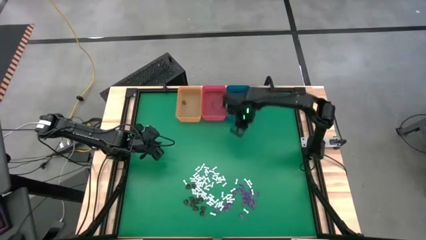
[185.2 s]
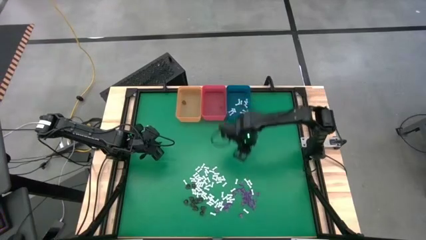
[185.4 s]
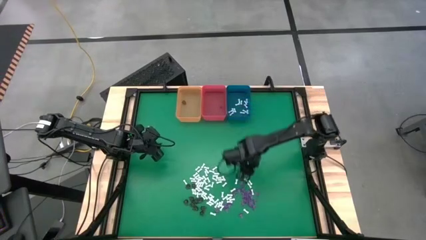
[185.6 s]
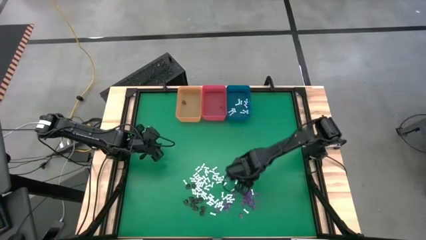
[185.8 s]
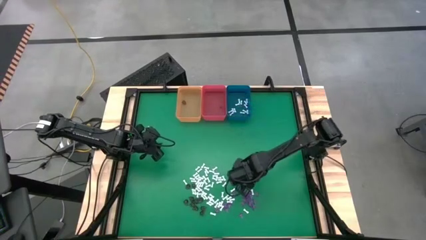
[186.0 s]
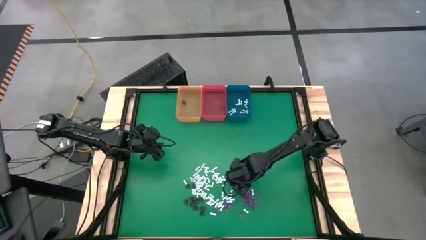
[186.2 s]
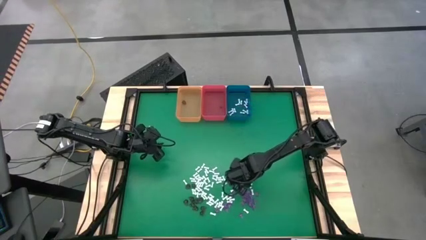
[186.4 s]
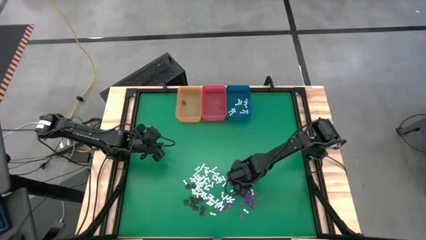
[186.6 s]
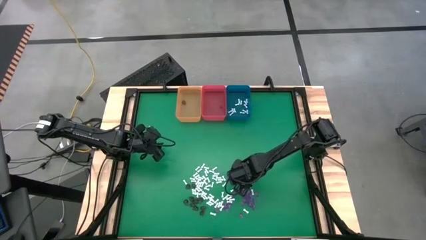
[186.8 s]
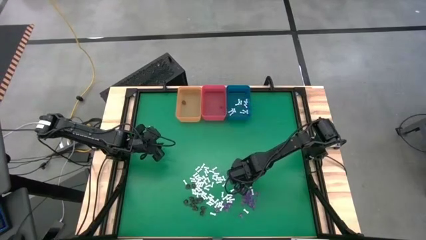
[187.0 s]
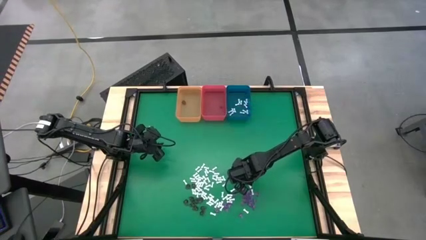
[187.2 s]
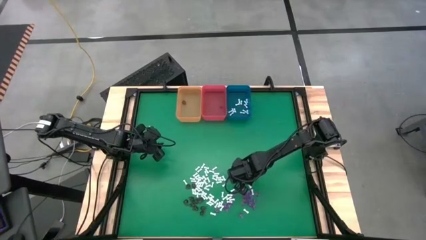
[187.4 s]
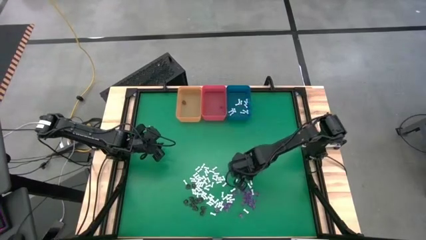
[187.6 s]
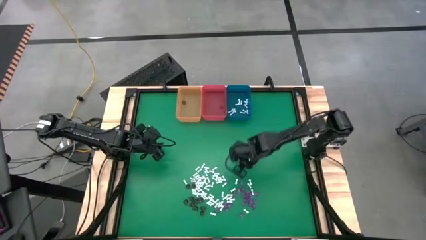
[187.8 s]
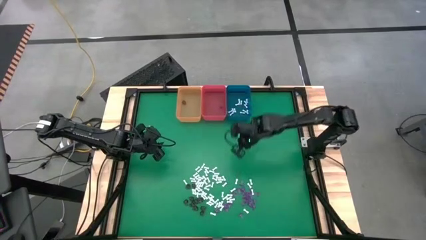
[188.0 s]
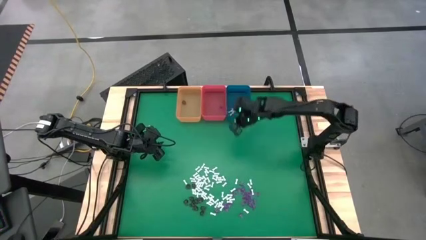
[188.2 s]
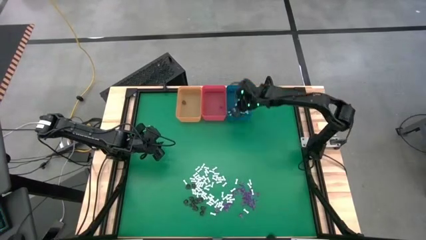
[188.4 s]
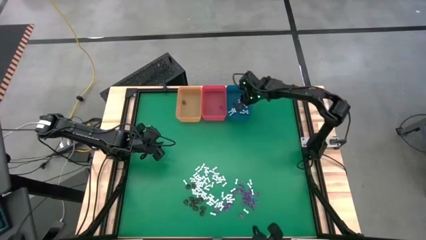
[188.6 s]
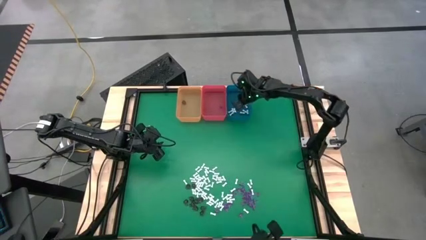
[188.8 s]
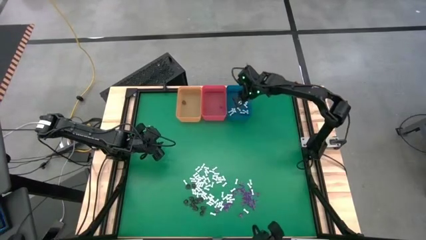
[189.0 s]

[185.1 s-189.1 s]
Task: Sort Halloween decoration
Put the white bone toy into the blue bin

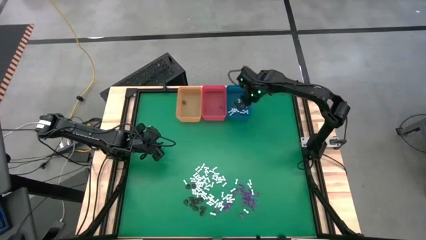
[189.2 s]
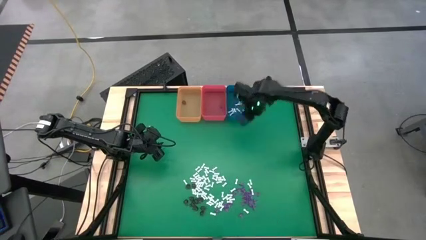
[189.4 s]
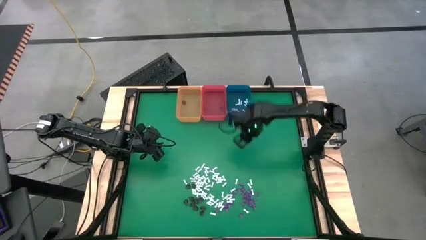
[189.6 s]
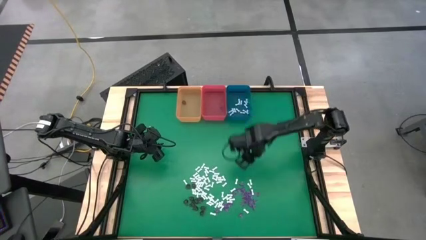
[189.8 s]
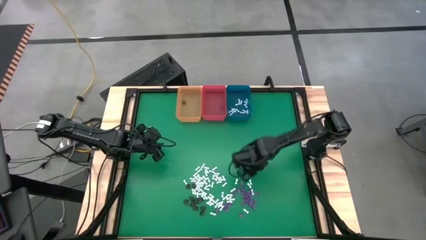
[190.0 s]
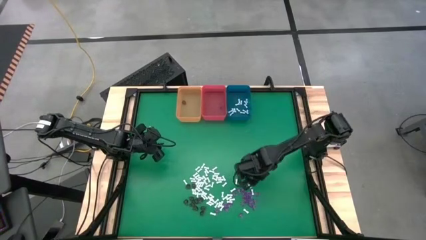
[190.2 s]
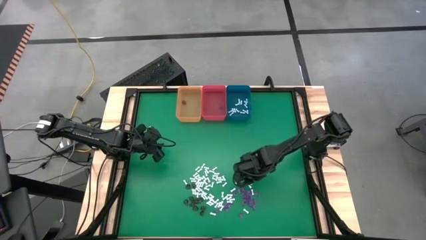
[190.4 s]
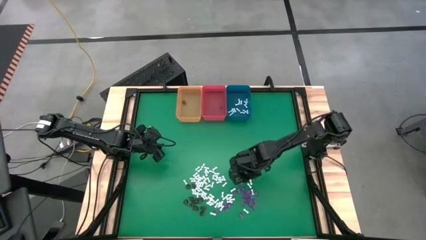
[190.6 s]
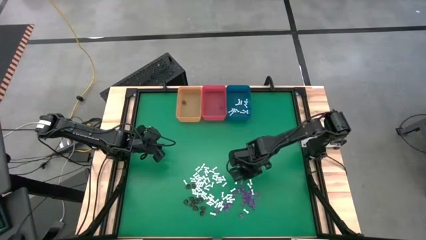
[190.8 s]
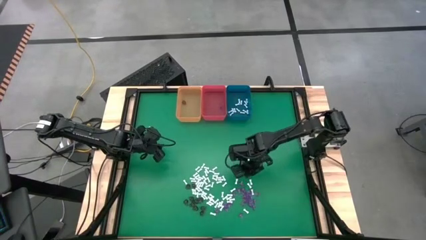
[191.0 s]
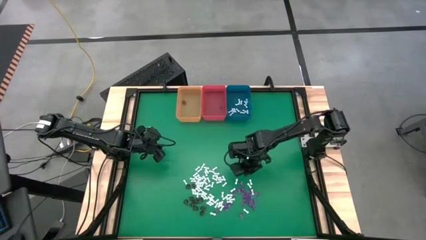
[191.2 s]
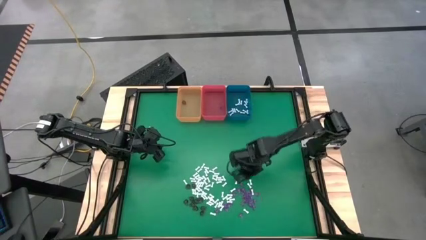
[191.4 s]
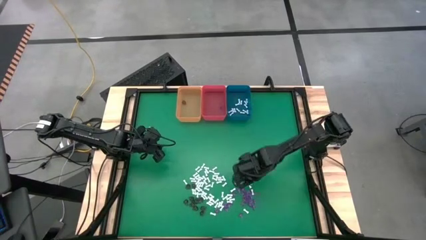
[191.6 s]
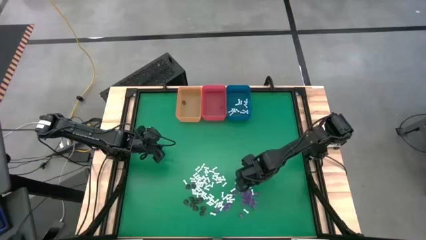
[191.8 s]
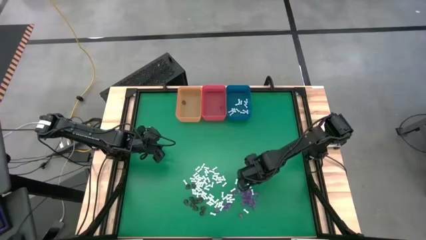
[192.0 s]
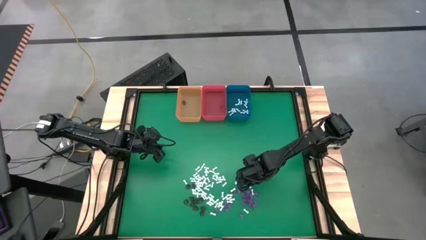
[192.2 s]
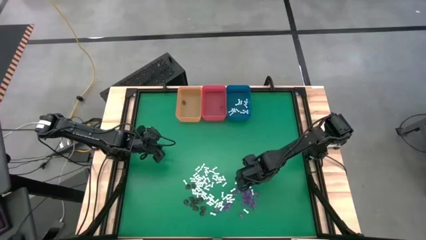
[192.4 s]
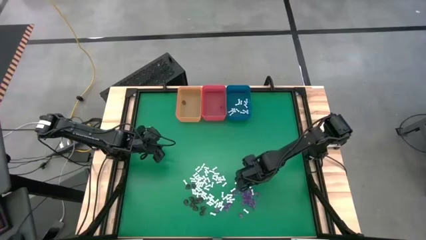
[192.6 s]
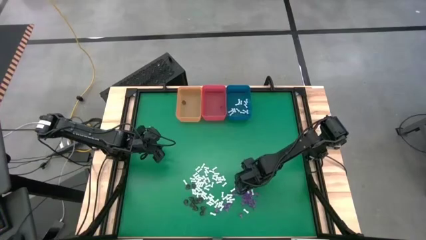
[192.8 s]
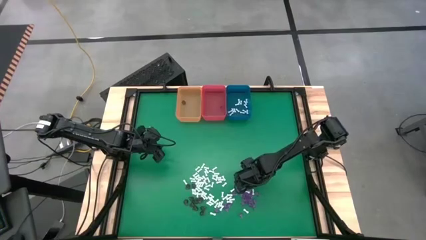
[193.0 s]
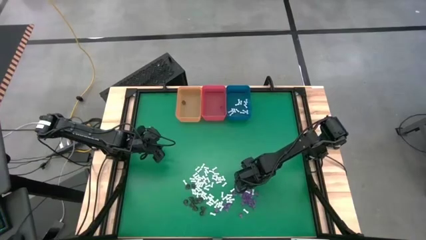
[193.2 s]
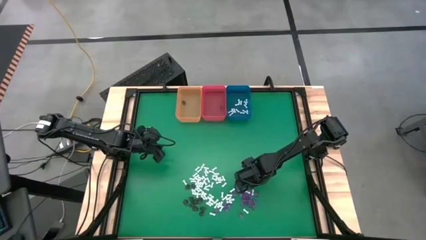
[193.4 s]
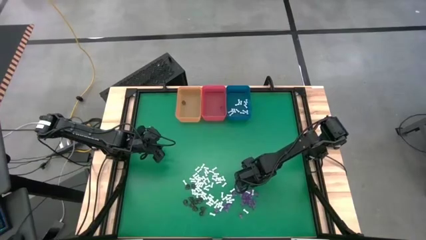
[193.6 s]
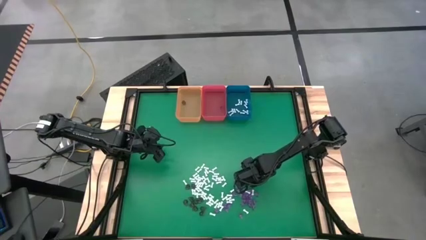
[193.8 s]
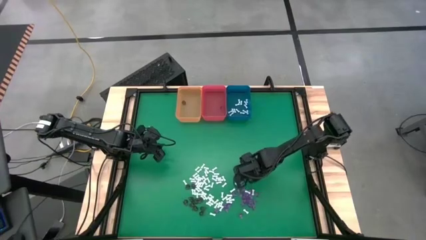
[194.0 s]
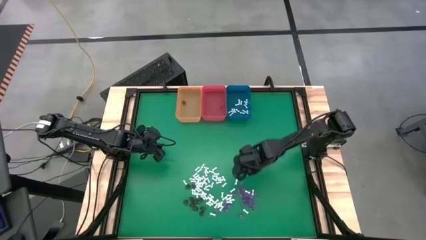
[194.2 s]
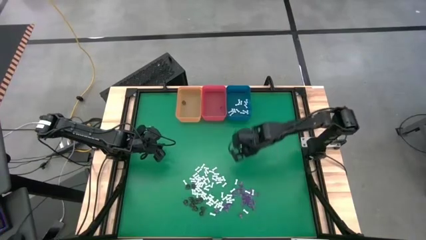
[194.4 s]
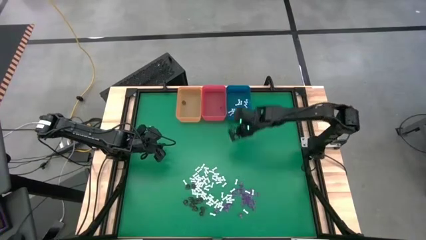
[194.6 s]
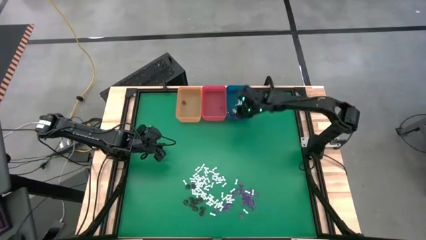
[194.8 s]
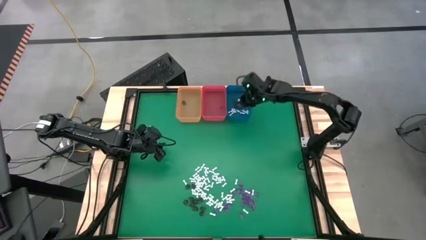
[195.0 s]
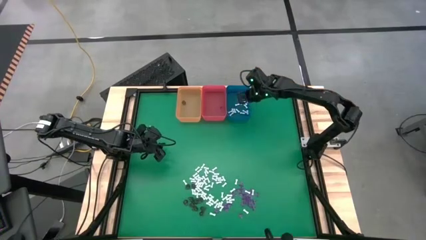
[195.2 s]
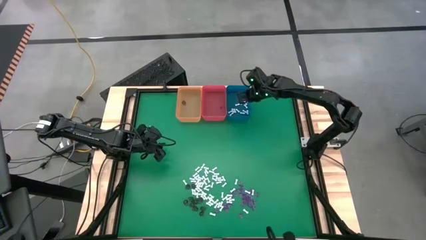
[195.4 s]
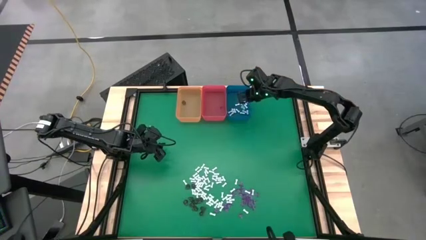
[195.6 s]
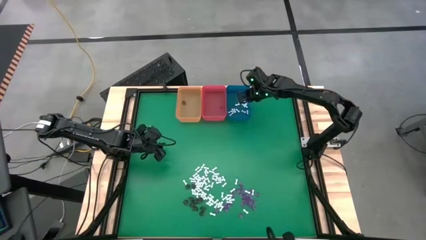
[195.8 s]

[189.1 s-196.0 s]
Put the white bone toy into the blue bin

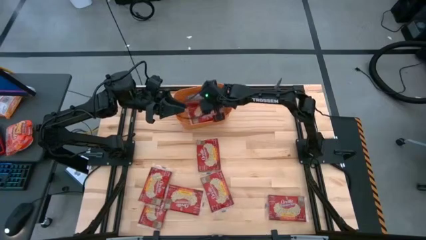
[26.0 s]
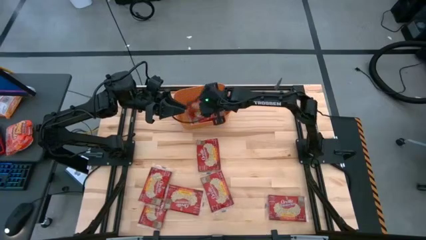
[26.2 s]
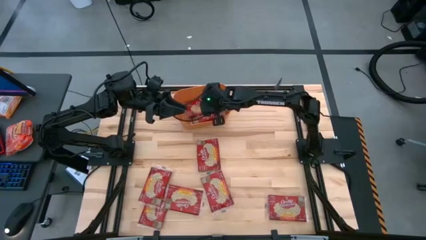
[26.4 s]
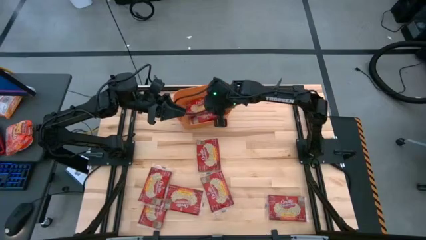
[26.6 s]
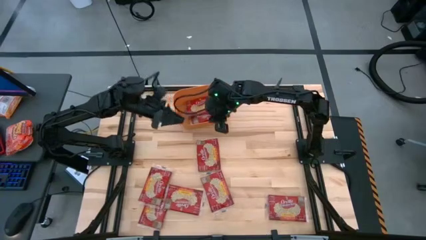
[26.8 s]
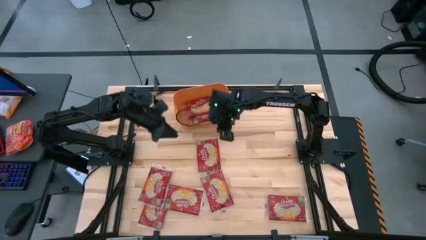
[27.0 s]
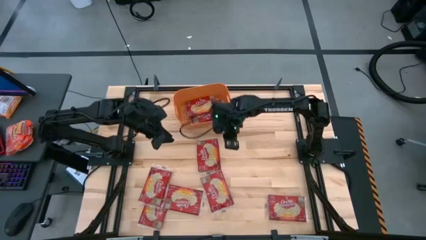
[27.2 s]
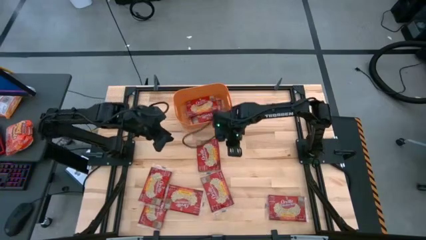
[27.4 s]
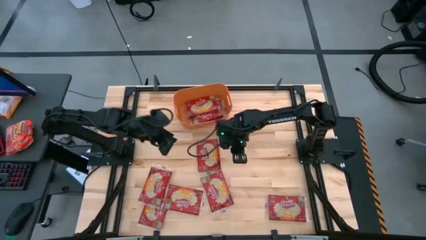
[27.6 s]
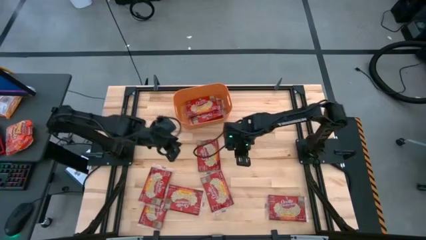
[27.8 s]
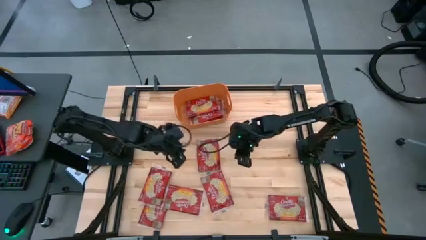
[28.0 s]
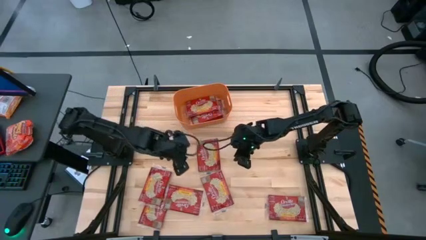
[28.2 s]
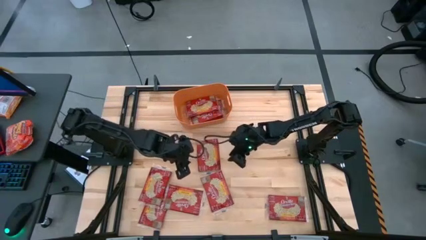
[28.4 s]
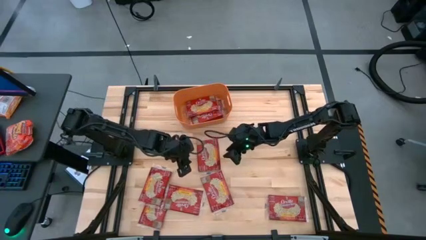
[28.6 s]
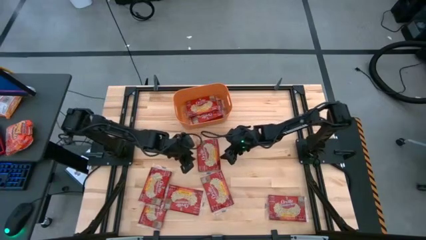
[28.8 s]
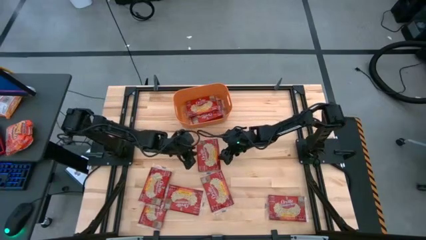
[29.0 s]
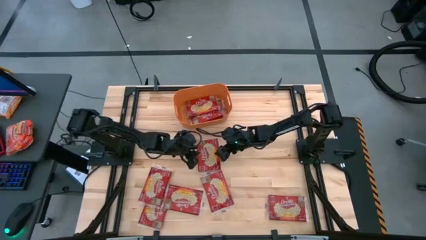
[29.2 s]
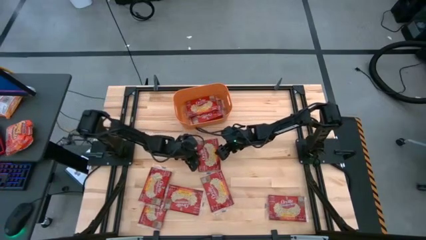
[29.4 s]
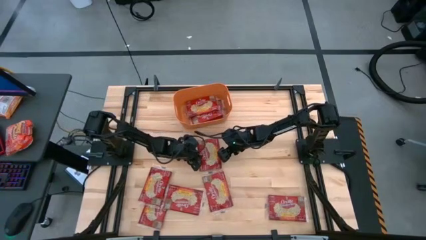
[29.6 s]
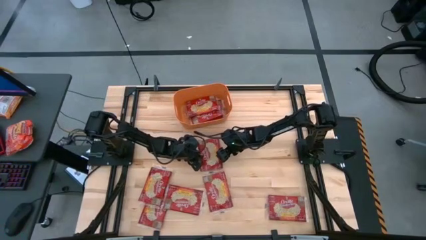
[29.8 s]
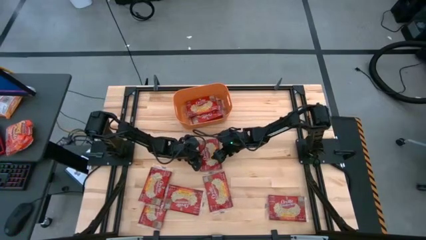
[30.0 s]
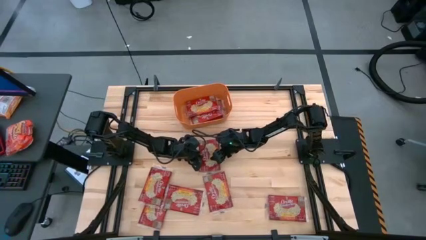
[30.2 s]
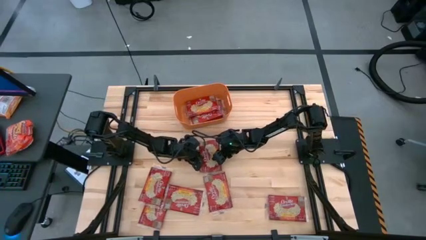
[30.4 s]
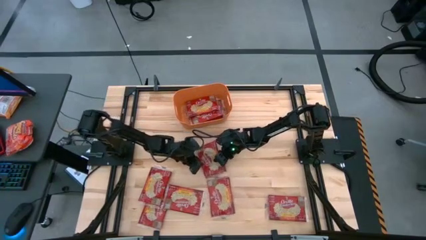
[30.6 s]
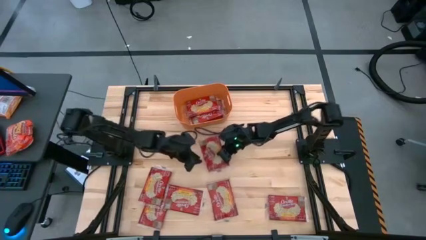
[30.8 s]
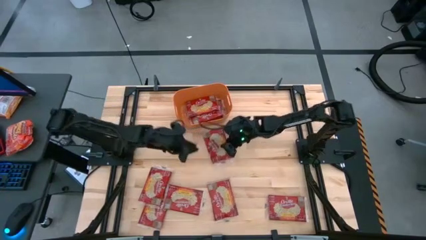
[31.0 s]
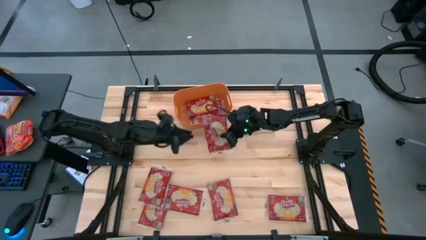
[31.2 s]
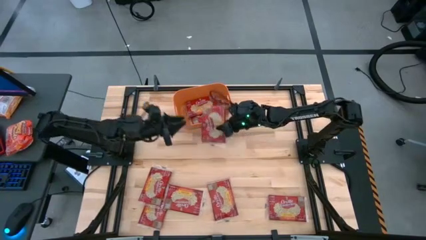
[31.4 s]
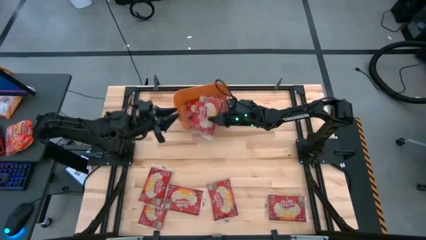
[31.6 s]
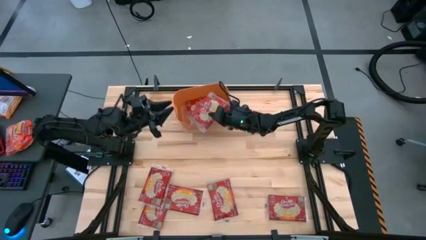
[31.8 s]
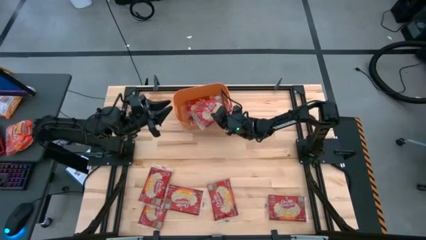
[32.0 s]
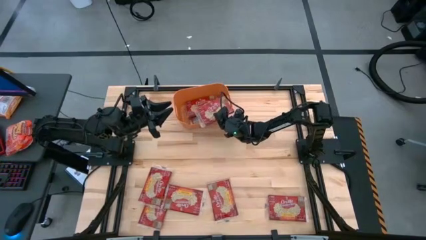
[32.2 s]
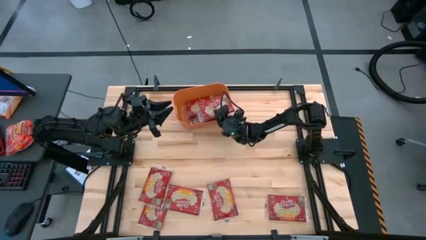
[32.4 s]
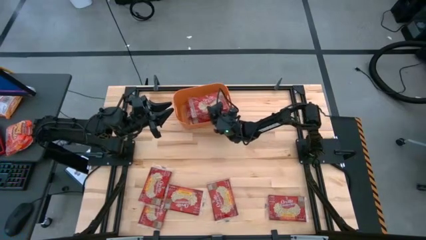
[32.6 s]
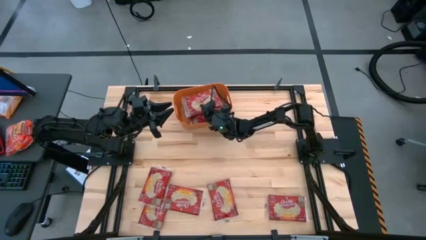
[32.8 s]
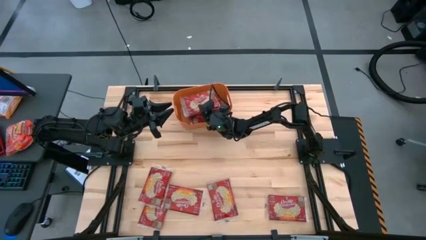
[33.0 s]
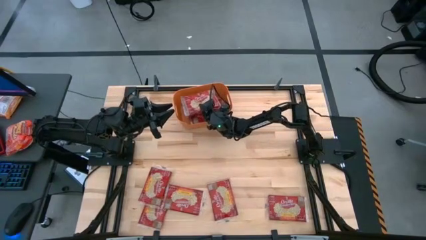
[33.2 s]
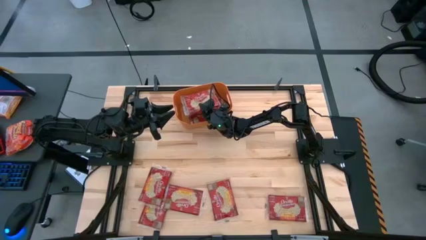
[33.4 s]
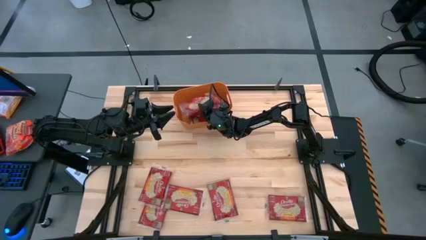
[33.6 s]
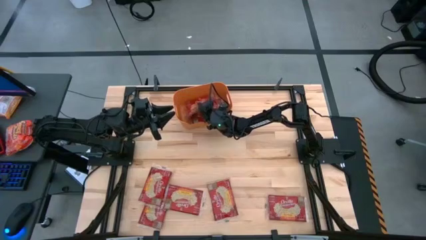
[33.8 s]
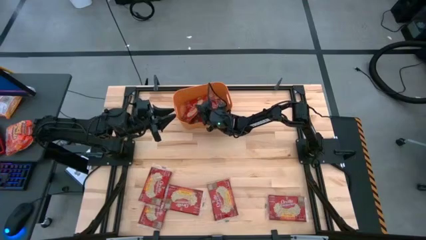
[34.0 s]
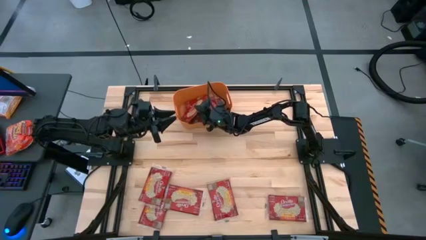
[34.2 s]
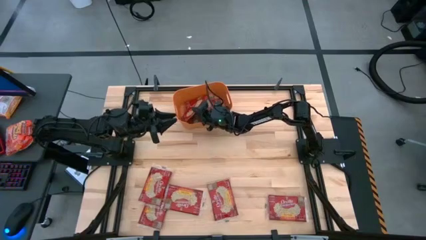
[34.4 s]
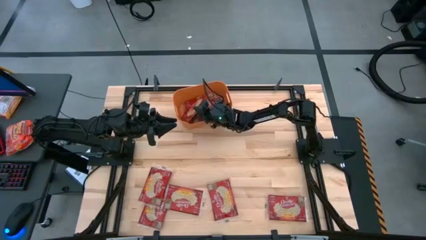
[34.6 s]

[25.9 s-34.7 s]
Task: Sort popcorn bags into baskets
Put the red popcorn bag into the orange bin
